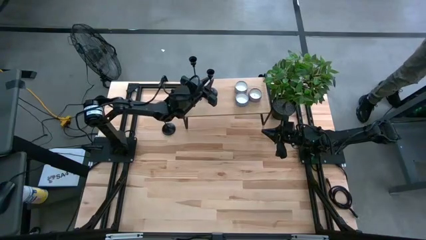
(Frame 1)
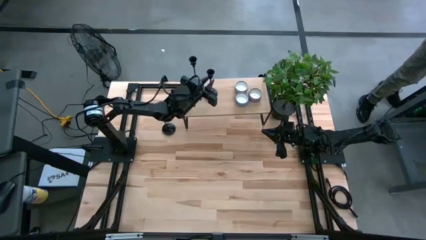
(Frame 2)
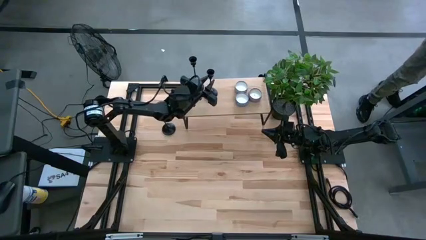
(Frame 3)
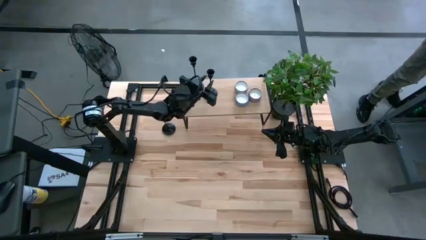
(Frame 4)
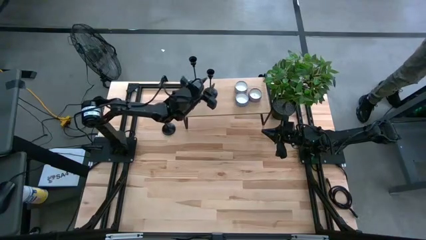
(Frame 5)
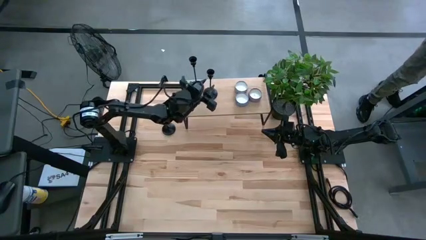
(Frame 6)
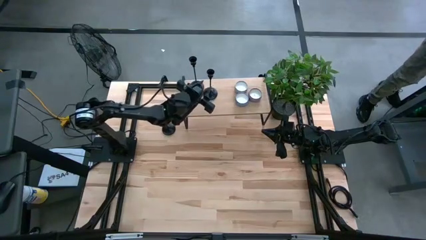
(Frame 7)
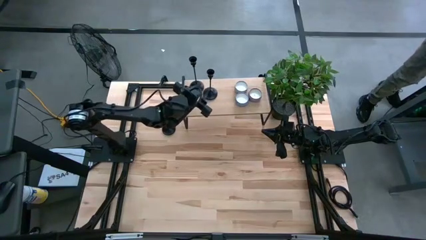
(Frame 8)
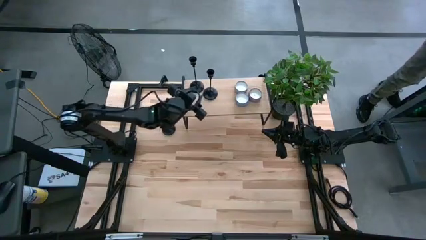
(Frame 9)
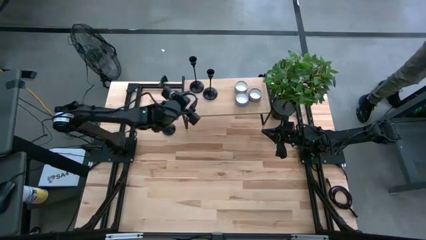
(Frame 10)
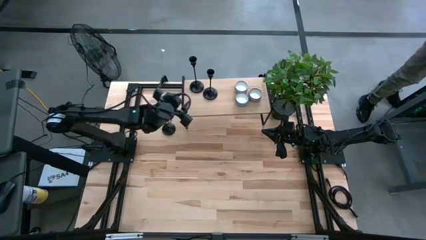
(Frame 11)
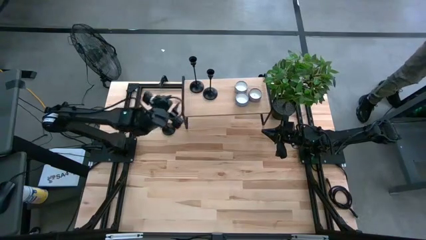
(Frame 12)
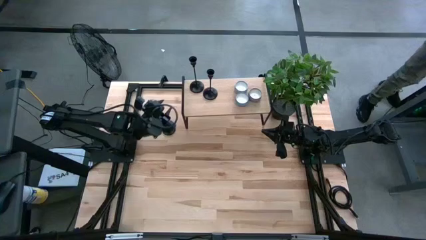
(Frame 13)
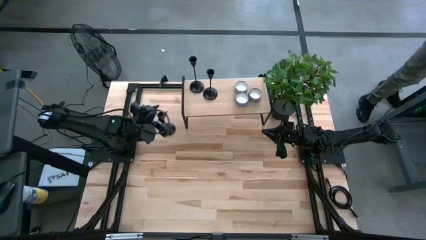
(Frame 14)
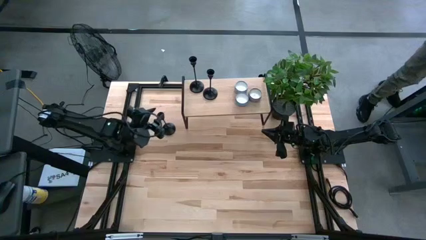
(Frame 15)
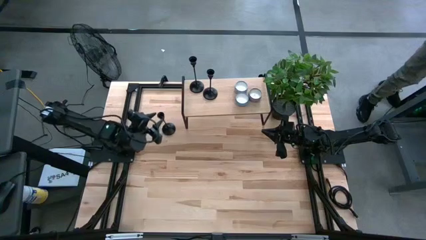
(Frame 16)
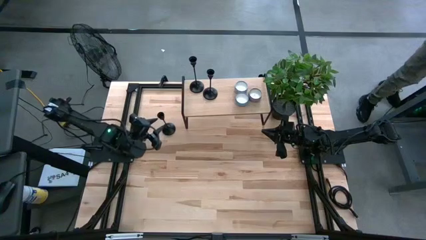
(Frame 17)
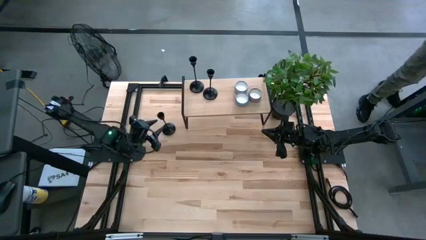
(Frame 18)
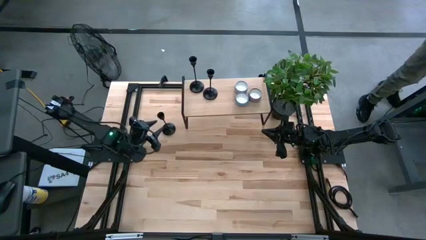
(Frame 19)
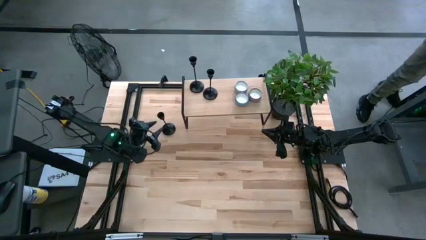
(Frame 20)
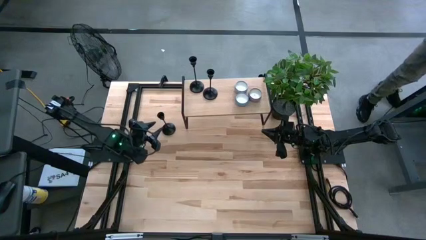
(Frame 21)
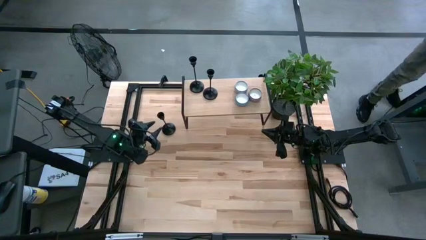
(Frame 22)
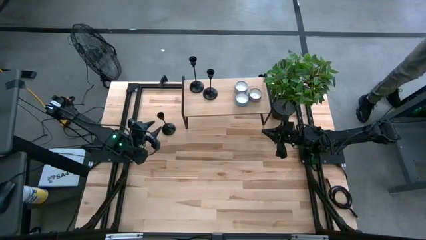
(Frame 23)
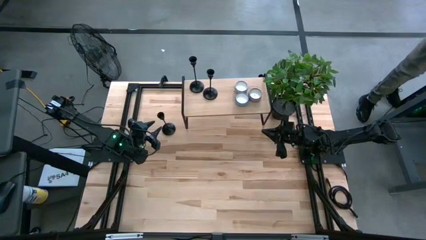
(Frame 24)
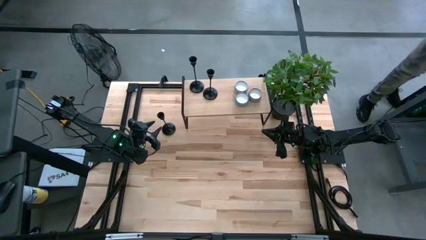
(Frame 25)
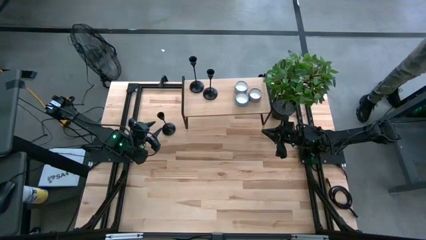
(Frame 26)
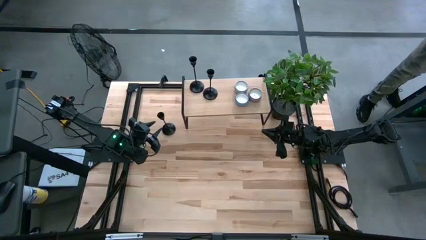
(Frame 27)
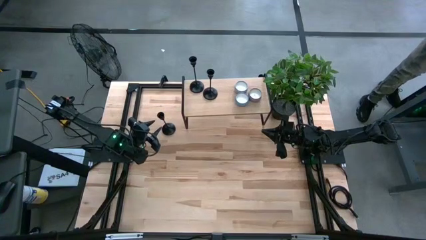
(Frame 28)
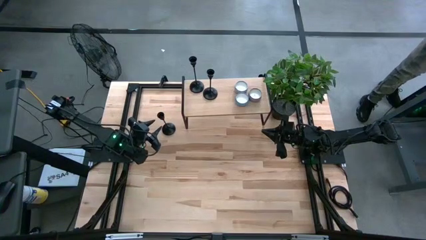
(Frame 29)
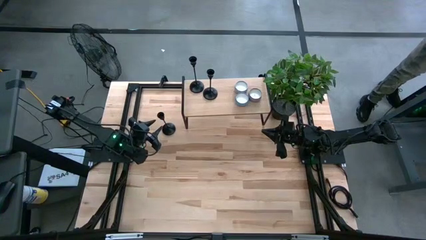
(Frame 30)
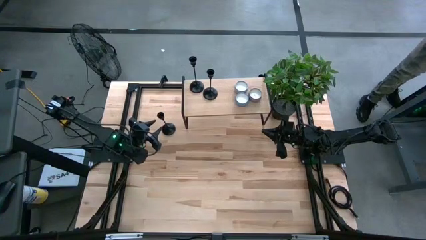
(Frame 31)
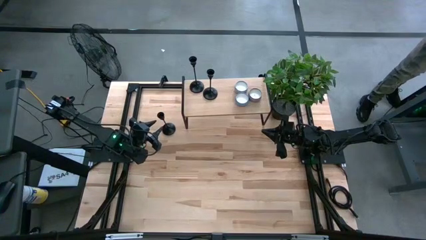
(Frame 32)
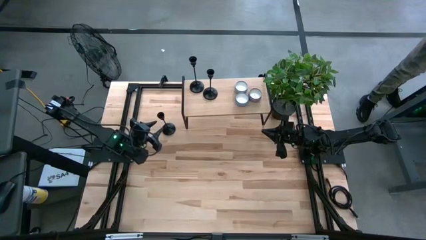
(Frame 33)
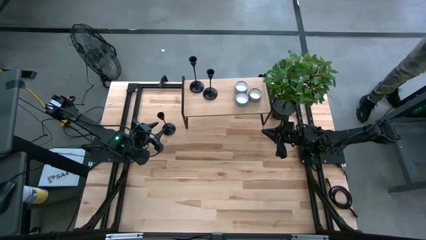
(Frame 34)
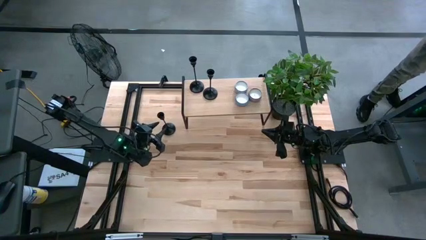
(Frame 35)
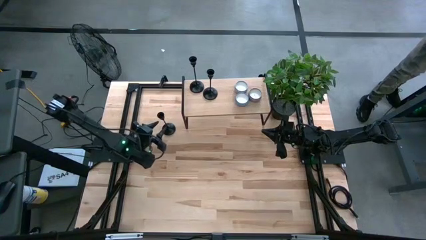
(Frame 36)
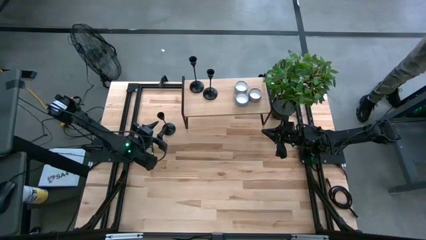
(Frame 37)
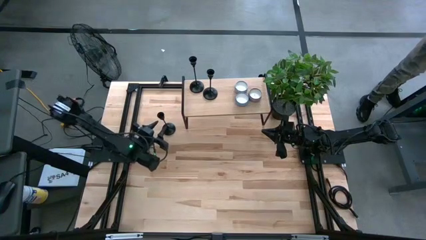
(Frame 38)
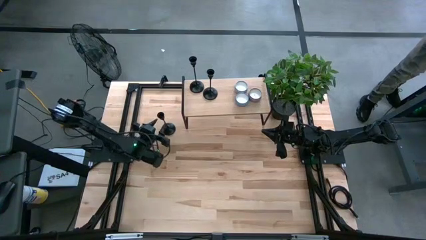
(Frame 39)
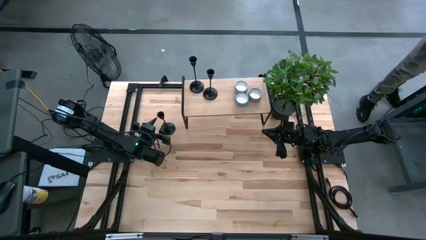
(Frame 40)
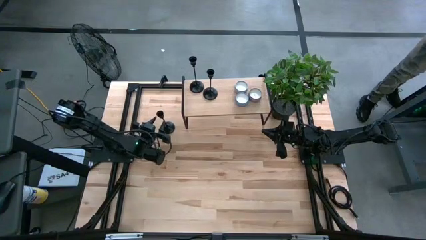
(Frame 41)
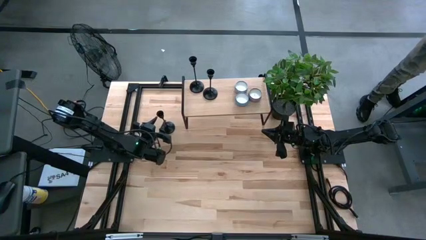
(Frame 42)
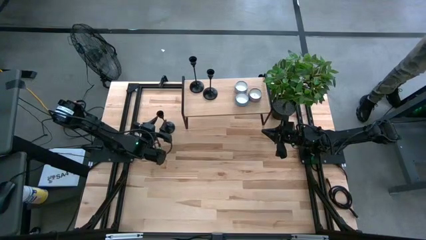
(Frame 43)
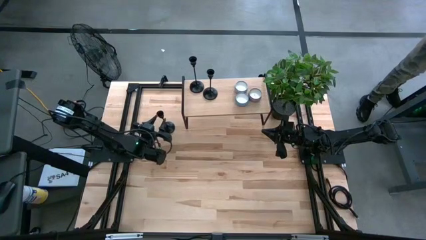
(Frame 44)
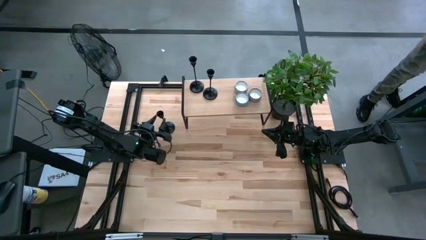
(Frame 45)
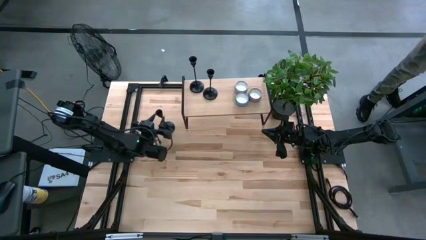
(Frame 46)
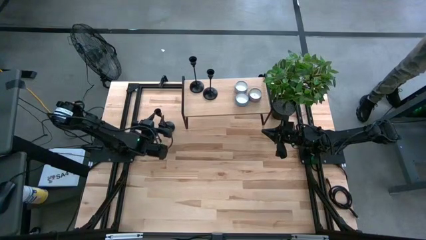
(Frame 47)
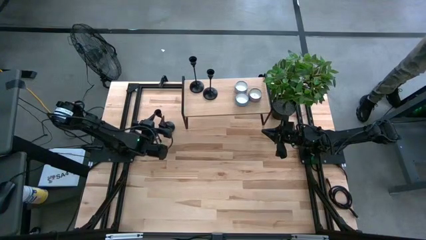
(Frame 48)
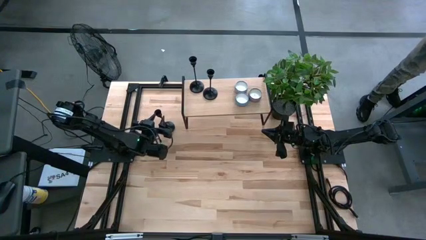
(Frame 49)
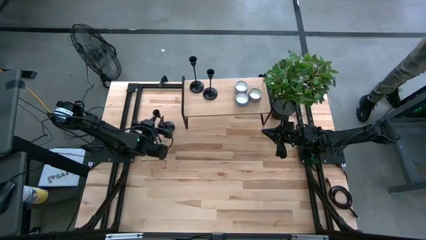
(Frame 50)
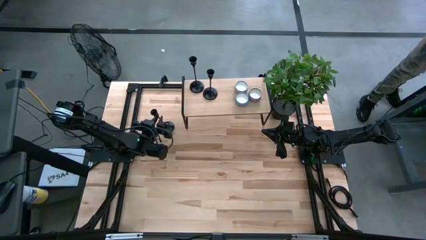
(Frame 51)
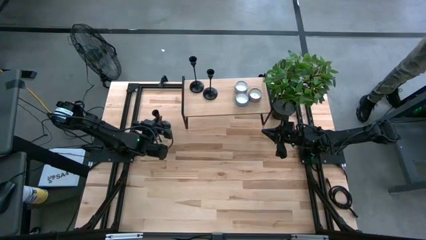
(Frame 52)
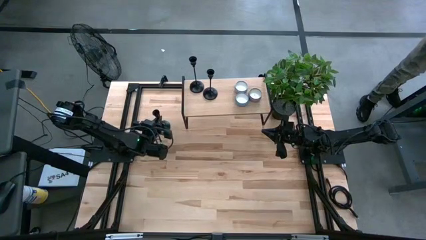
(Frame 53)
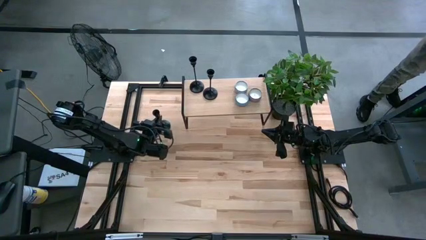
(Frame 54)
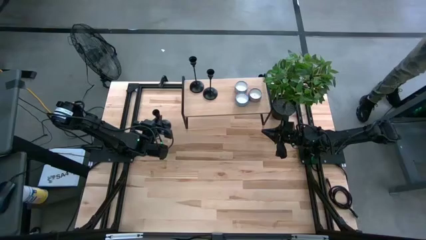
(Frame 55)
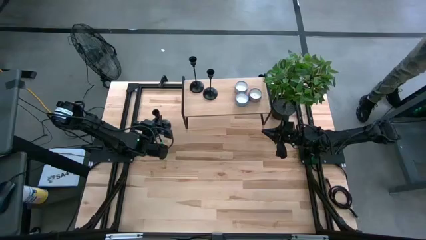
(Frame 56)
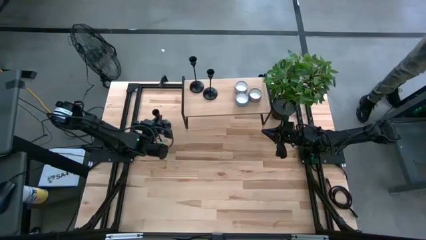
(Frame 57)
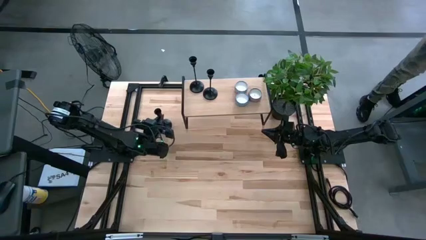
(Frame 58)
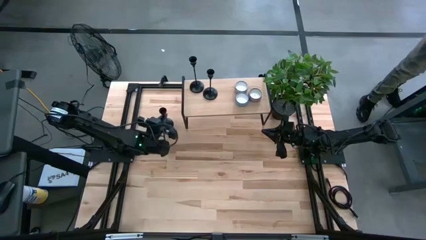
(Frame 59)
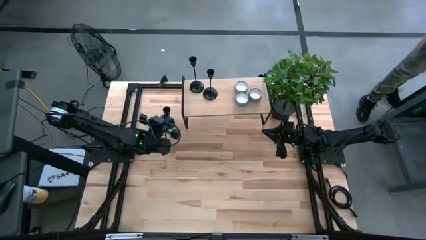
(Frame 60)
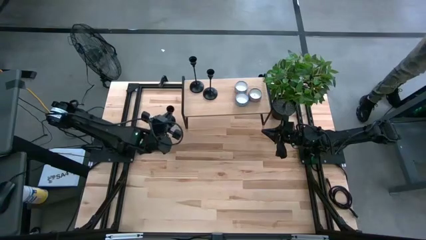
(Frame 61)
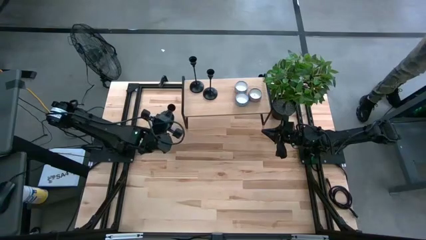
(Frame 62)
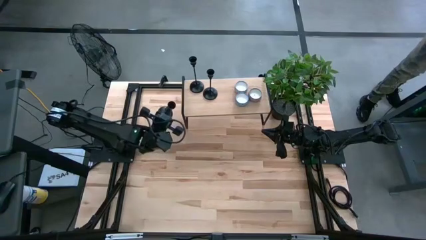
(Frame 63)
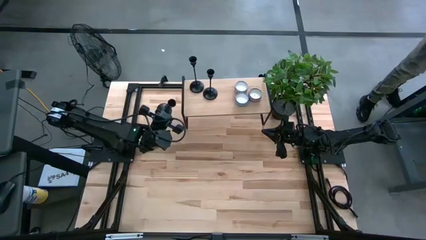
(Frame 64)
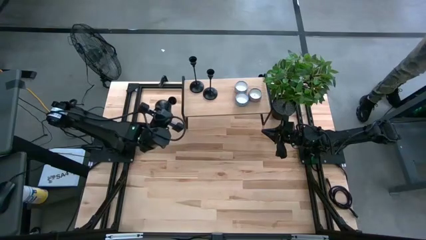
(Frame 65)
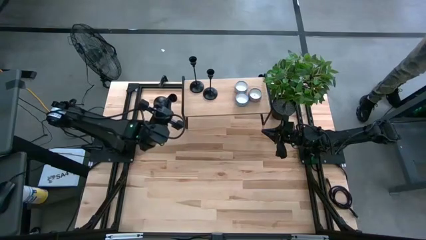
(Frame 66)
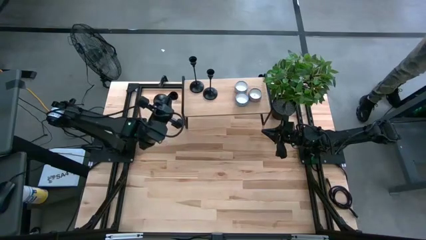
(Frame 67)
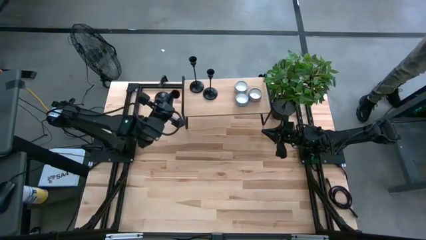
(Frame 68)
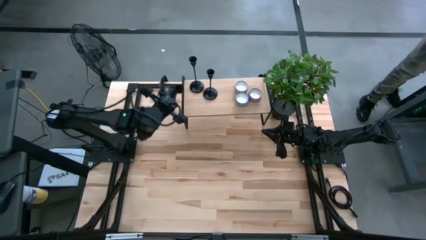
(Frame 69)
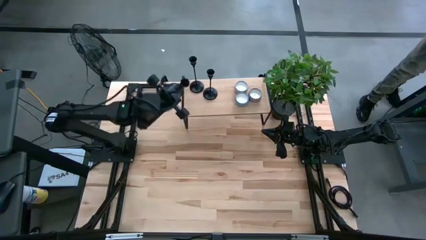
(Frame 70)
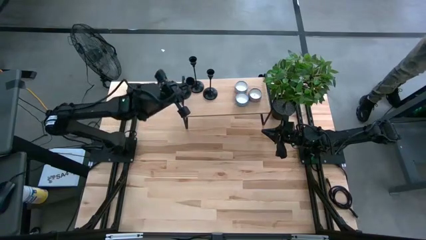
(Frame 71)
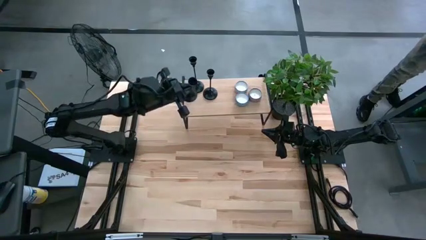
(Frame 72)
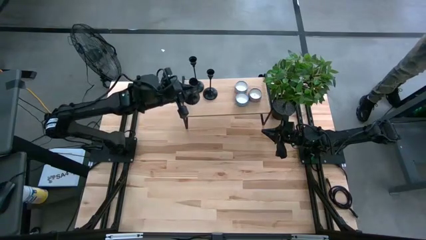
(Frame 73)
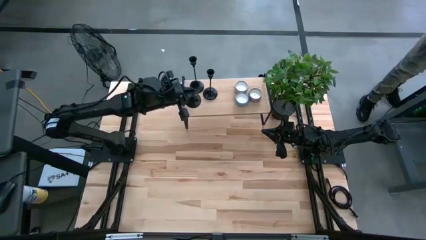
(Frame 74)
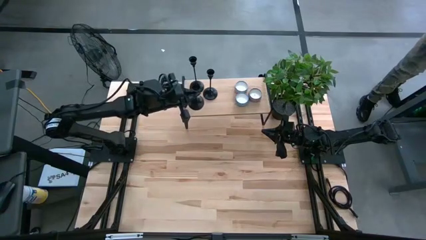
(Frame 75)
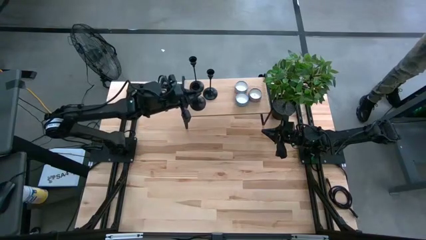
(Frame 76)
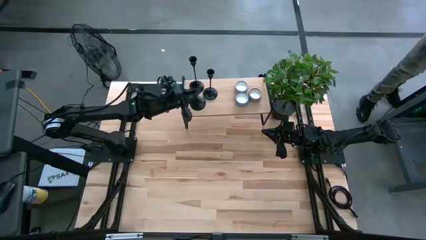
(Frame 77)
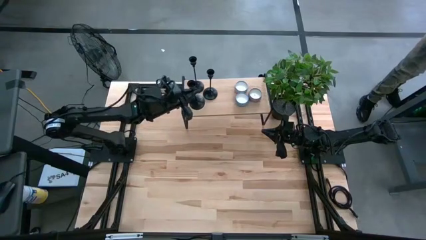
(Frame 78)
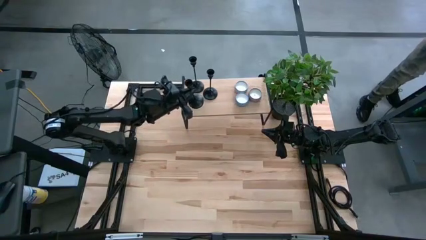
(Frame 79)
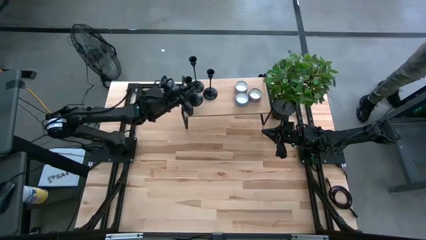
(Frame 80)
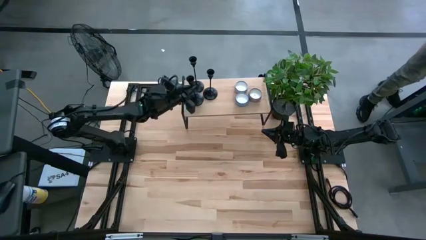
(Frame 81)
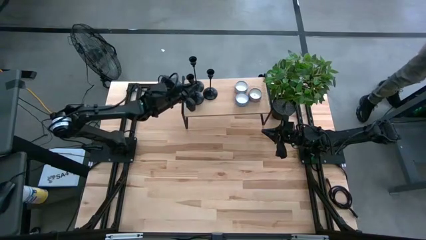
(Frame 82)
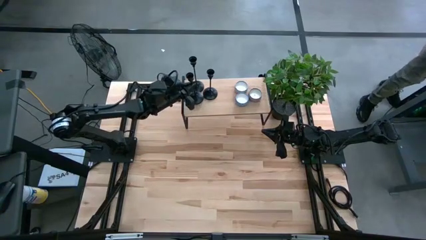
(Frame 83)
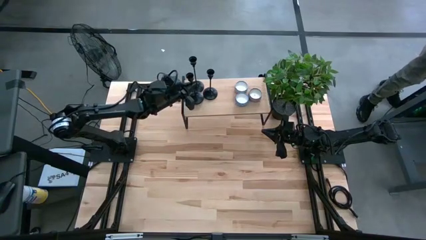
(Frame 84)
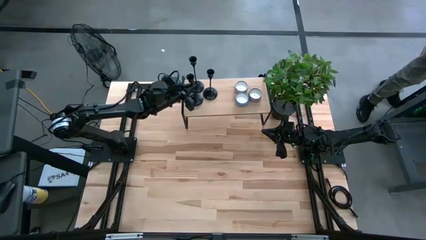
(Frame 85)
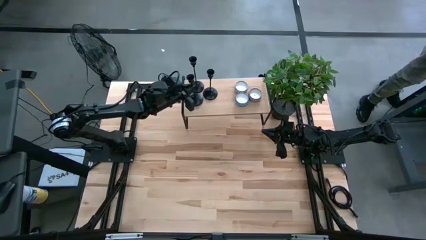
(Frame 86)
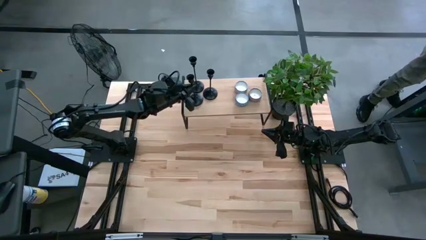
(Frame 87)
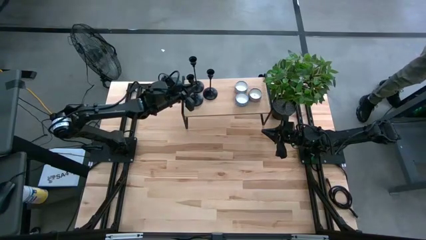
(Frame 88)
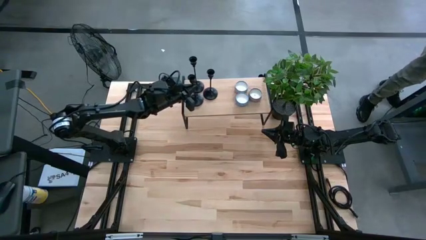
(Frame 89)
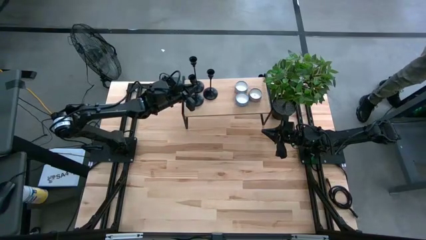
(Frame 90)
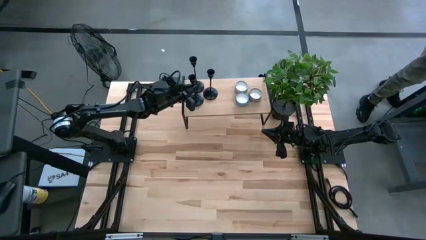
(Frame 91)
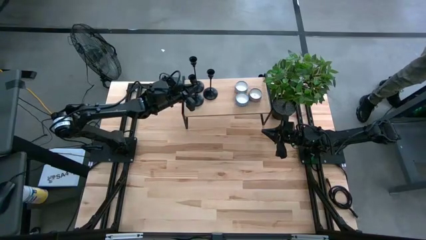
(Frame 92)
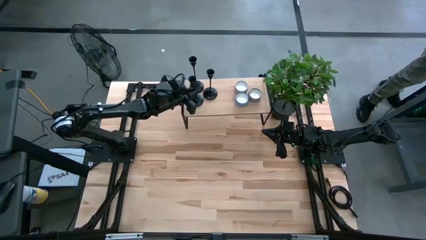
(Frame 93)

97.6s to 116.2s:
Task: Pick & Place candle stick holders
Put the black candle holder on the shelf
